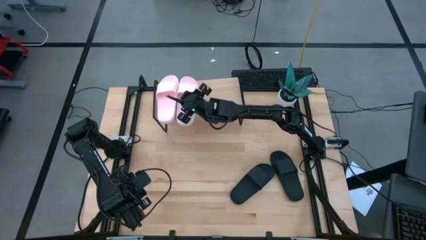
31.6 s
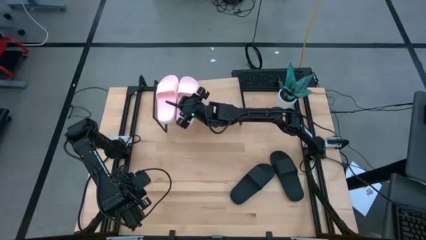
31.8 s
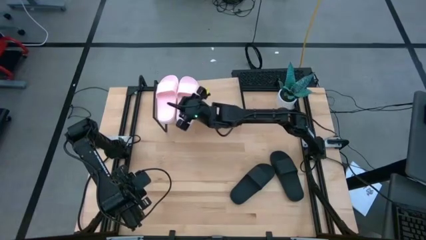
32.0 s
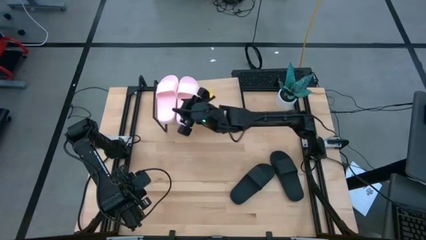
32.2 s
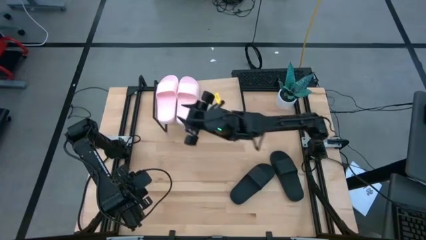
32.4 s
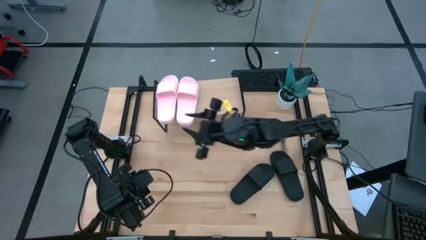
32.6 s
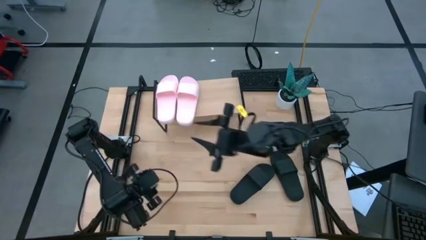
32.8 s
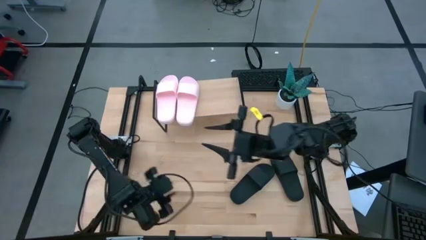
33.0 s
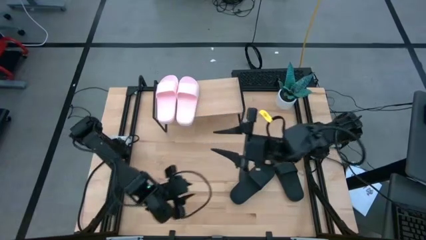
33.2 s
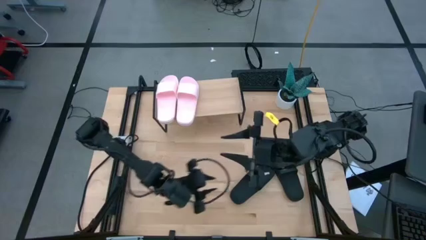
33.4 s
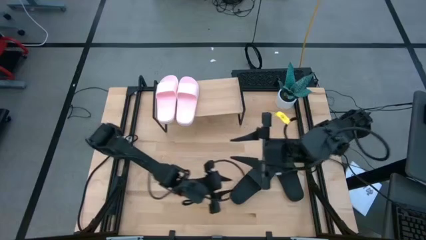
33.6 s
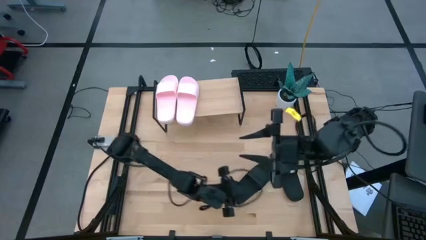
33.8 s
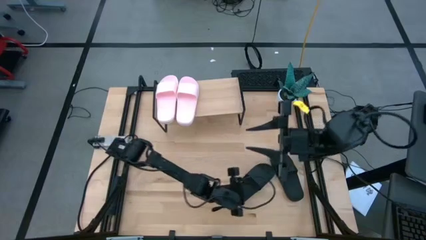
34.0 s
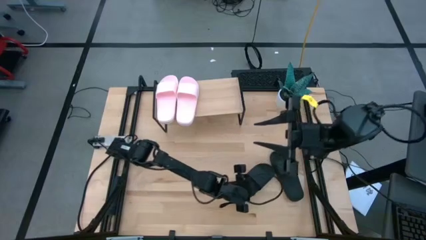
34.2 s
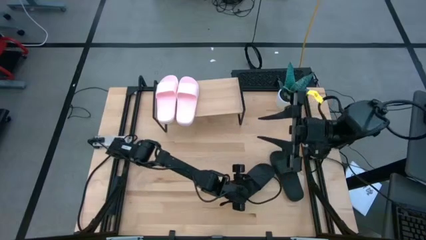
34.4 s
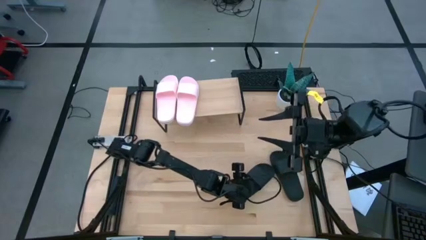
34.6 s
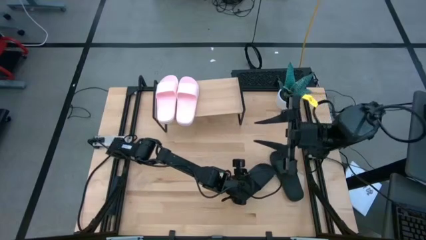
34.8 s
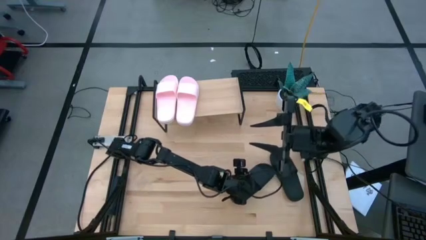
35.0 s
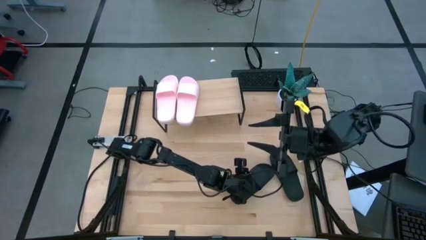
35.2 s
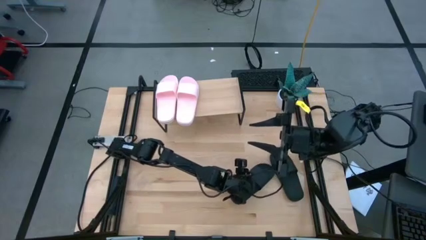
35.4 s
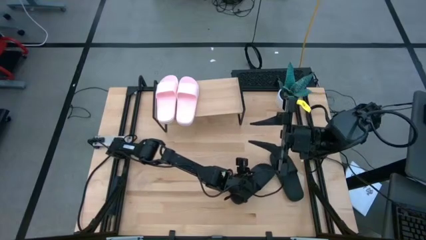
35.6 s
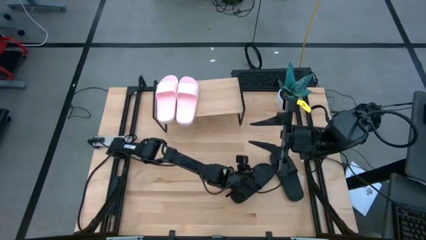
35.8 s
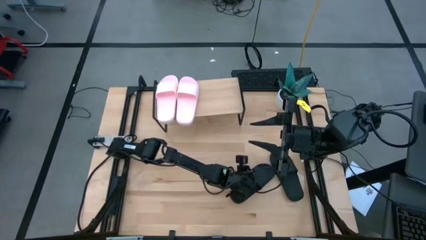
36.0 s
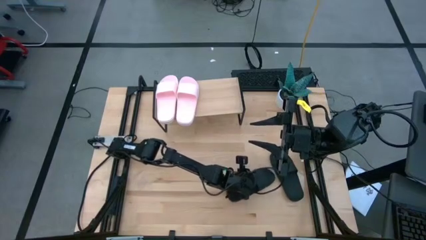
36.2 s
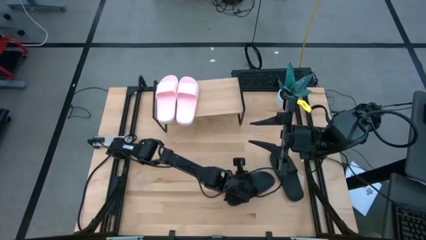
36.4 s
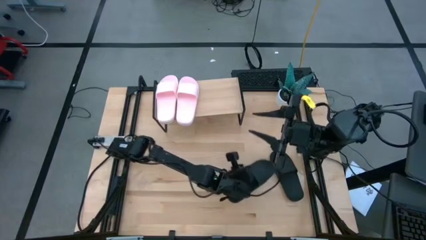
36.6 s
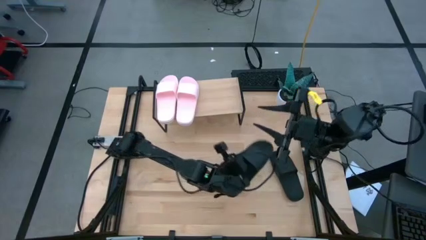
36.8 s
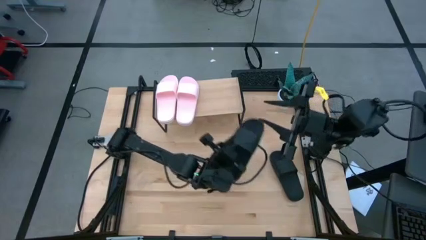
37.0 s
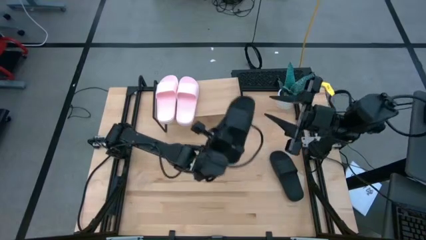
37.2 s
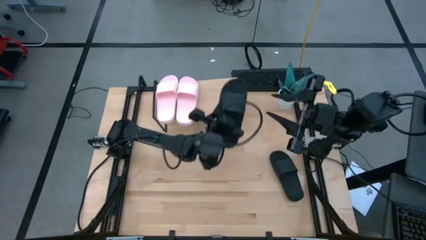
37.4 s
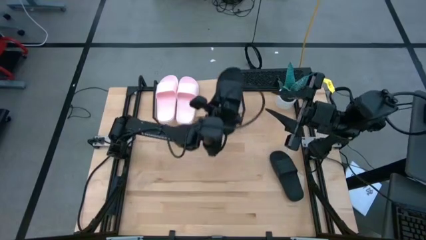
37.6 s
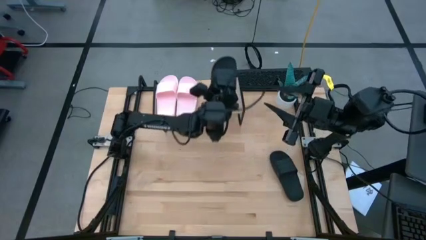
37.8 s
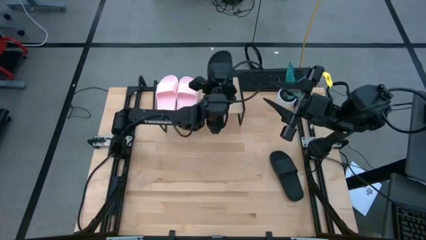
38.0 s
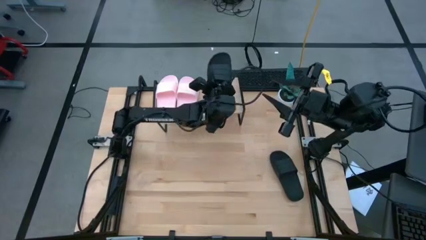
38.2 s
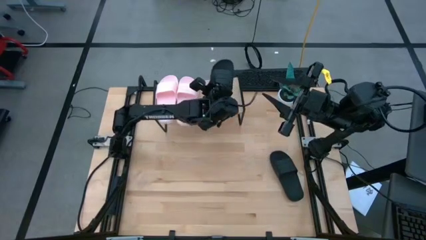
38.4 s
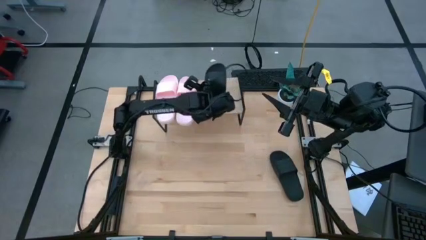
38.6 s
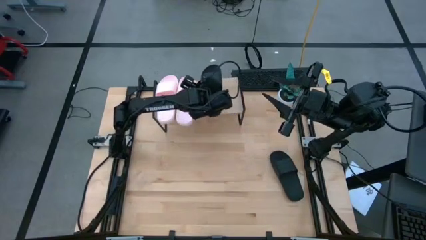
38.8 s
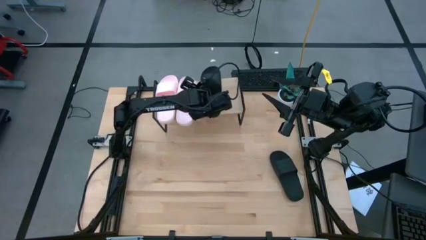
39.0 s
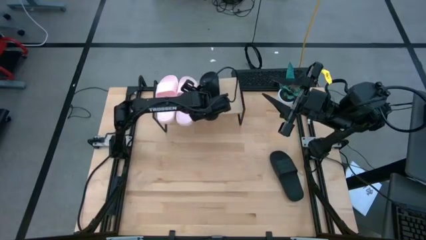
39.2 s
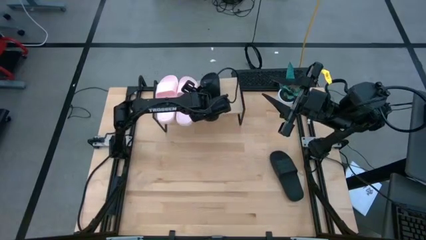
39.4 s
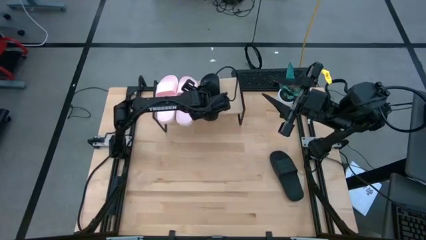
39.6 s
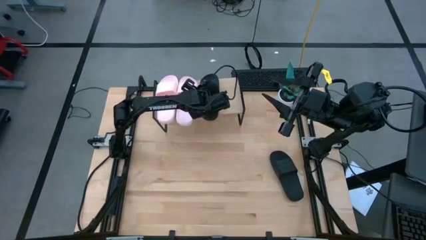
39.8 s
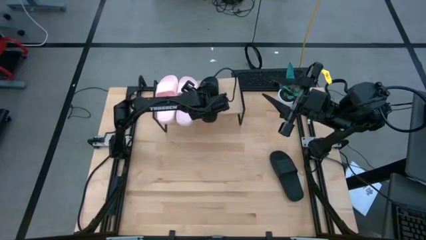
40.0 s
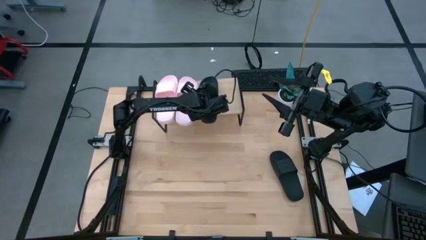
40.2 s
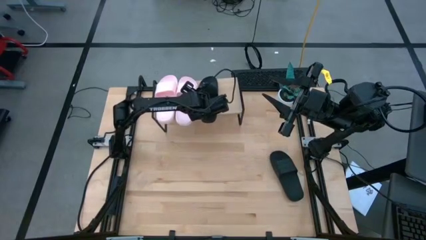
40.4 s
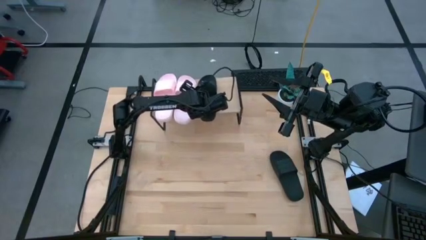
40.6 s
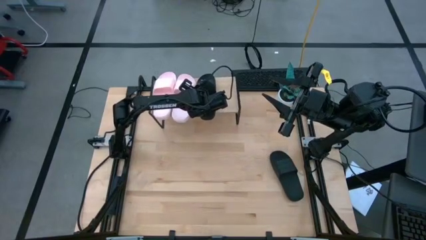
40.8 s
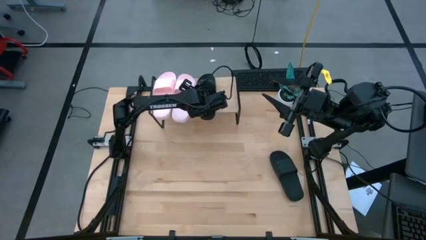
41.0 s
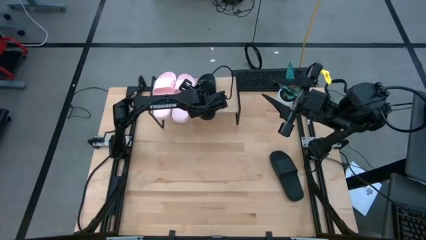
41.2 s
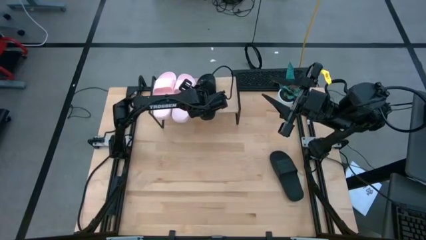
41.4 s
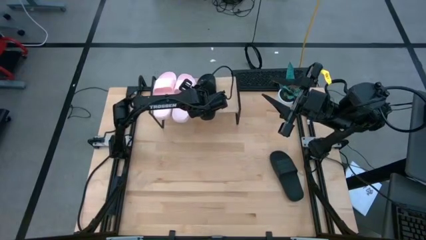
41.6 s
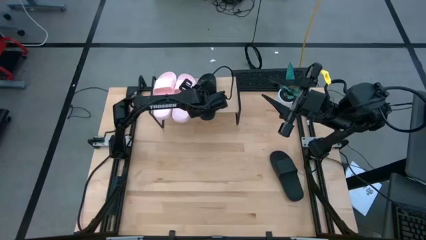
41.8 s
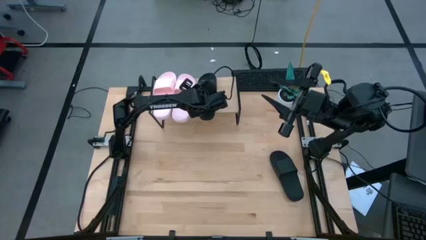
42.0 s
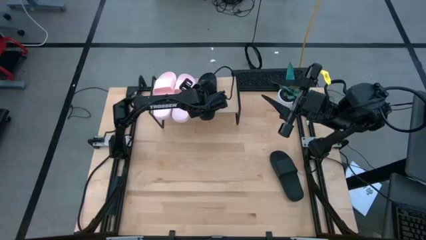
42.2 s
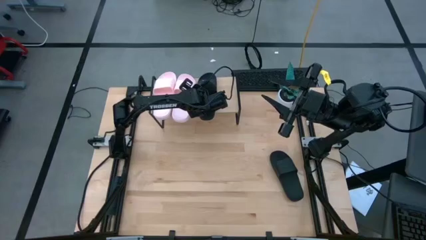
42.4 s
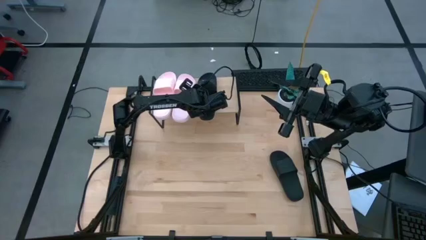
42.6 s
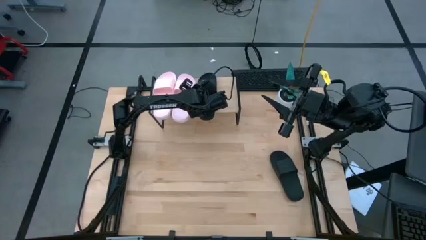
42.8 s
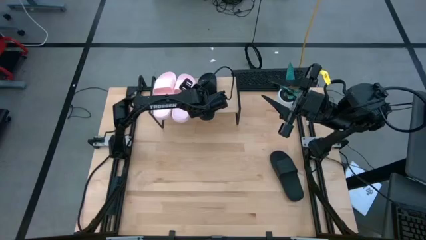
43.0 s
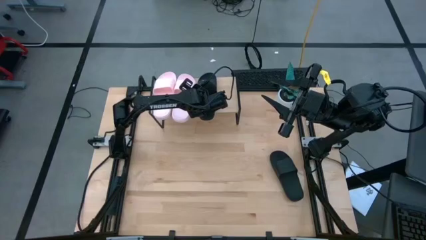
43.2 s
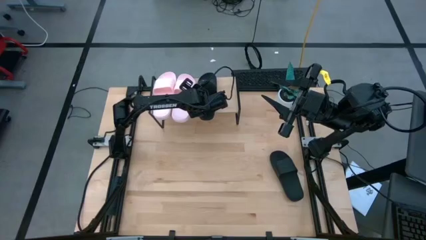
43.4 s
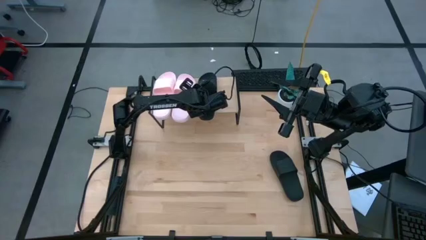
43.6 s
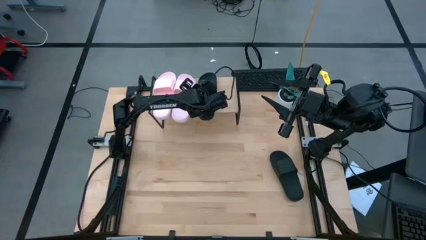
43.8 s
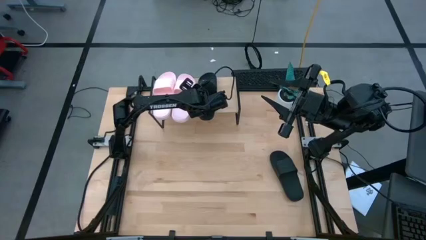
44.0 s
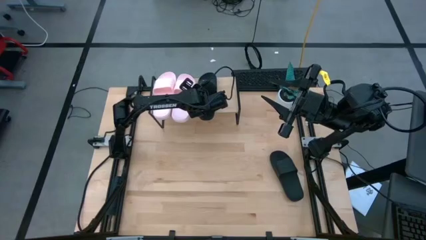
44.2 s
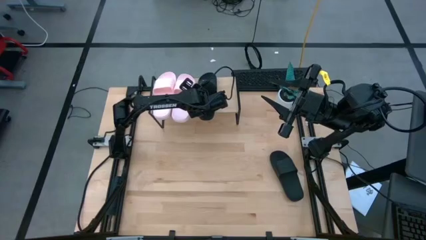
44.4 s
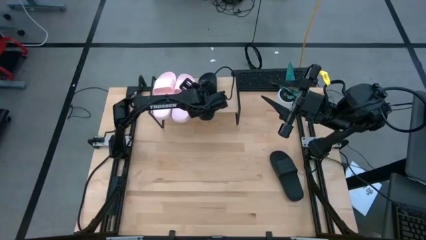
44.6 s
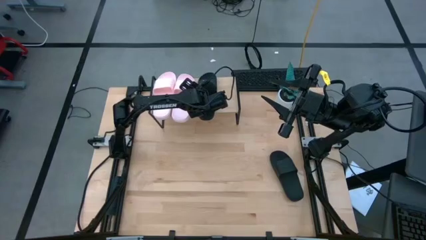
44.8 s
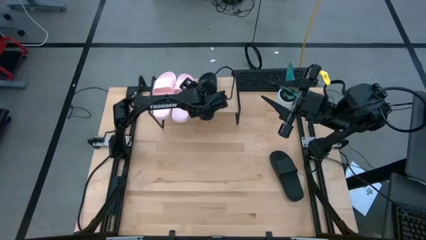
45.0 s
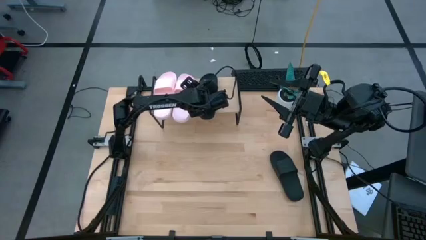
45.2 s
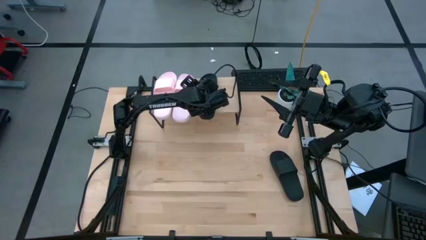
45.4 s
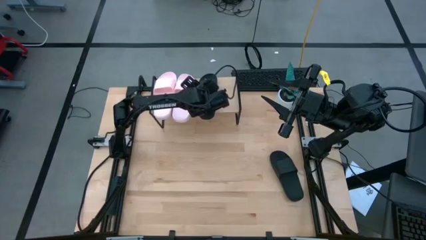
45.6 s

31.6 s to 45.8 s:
Task: Pick and place slides into the shelf
Put the left black slipper on the shelf
